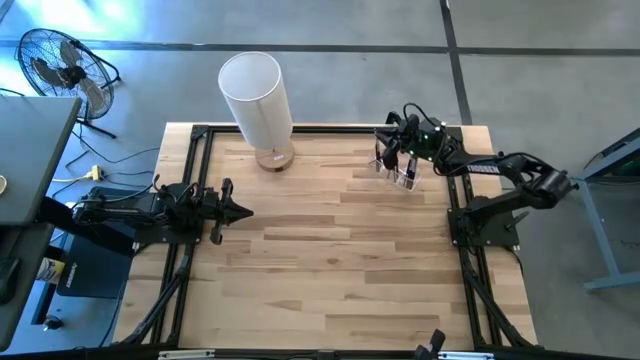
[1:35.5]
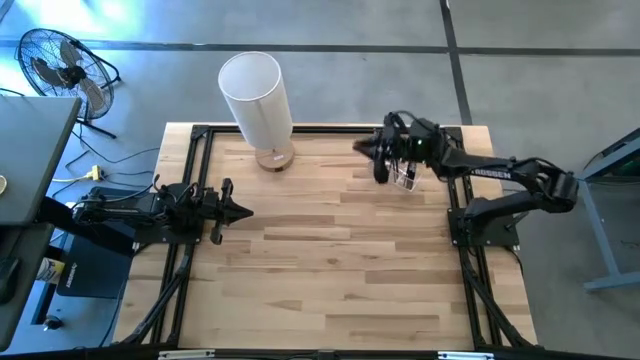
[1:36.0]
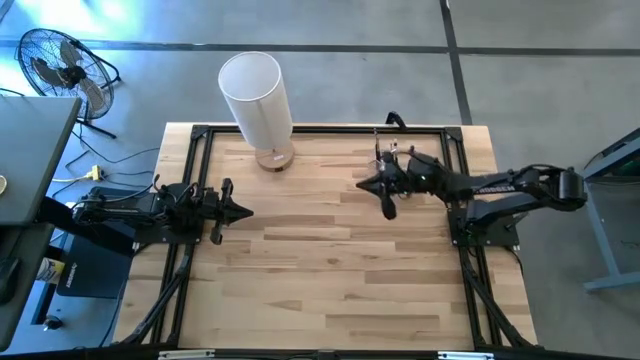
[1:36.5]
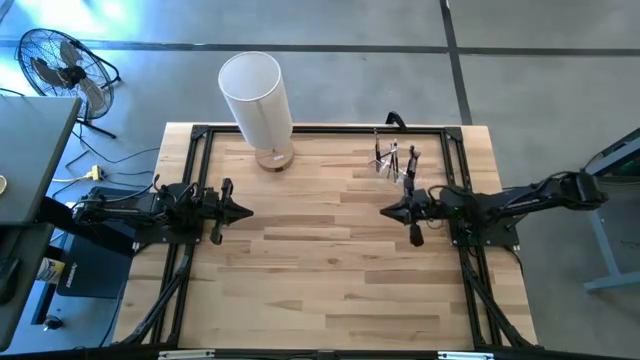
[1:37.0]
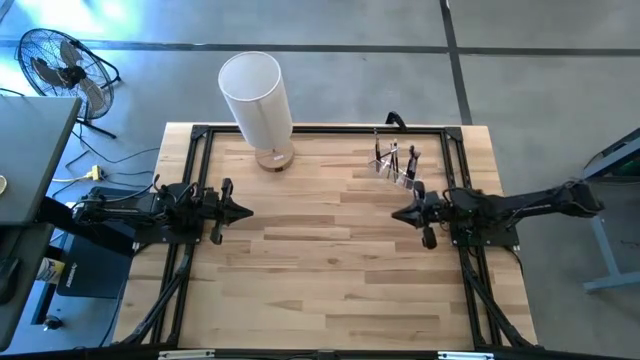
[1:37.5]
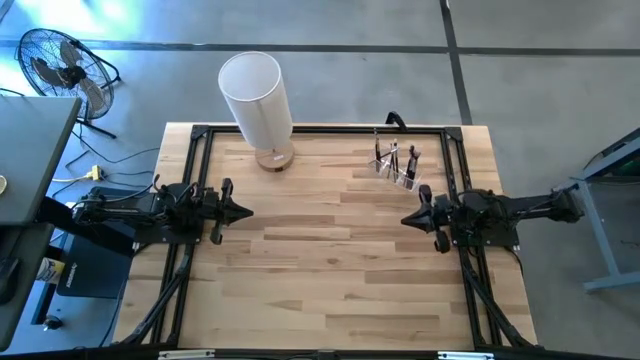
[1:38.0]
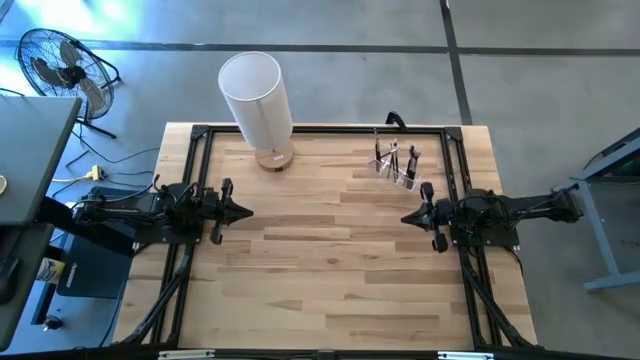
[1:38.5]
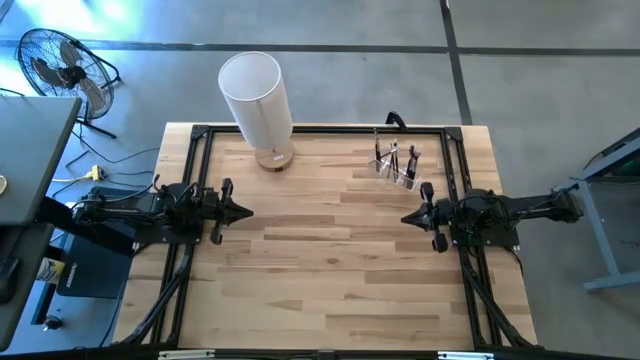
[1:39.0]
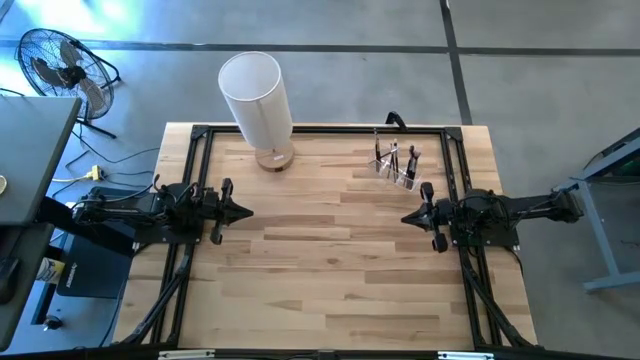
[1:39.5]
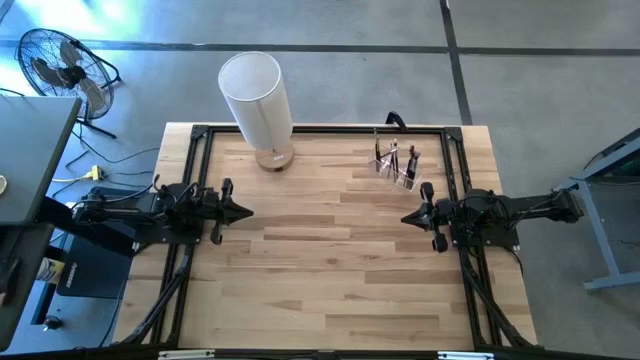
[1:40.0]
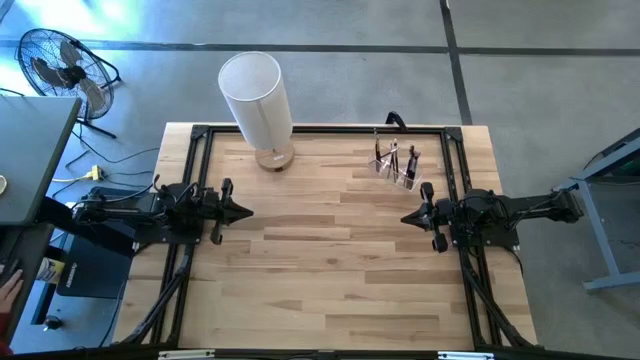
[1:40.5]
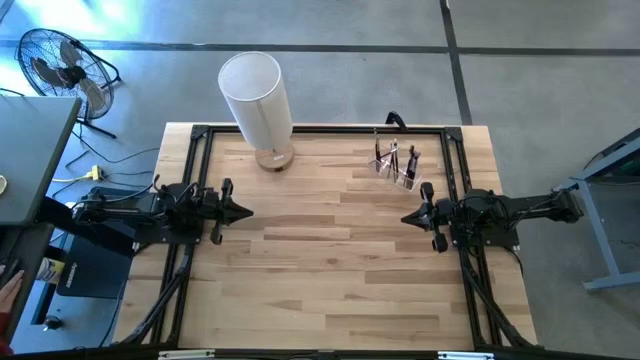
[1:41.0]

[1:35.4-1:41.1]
Task: Put items in baskets/containers
Return to Home Position

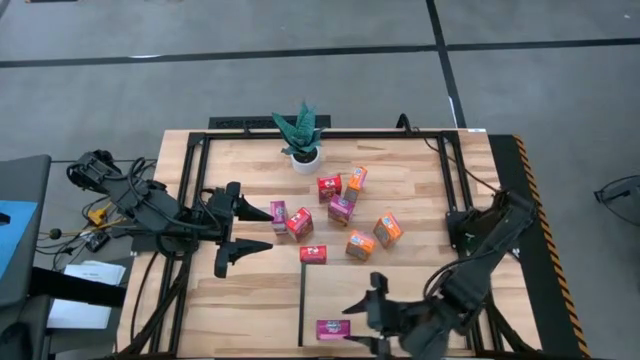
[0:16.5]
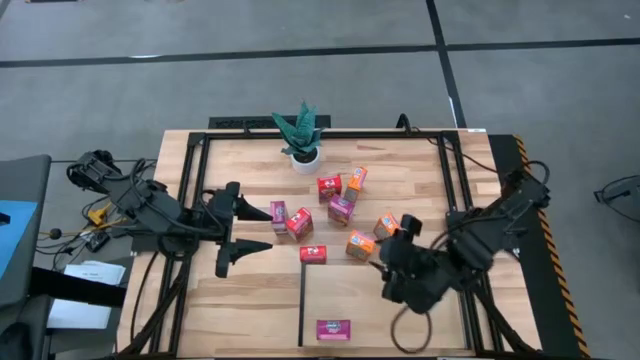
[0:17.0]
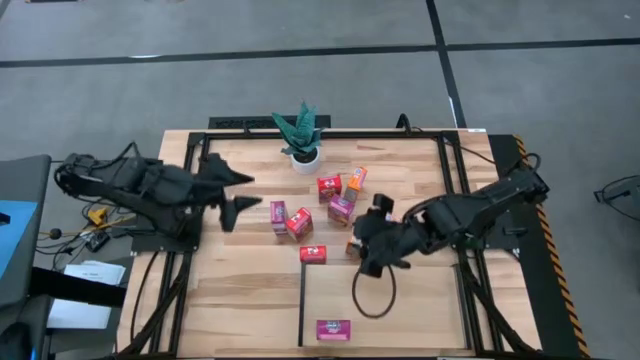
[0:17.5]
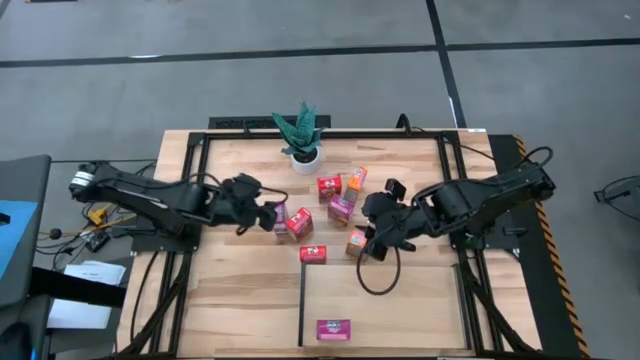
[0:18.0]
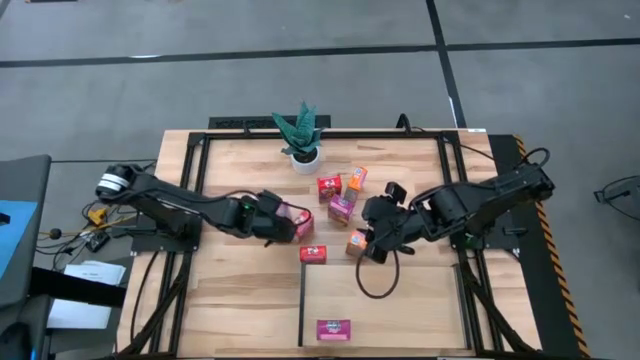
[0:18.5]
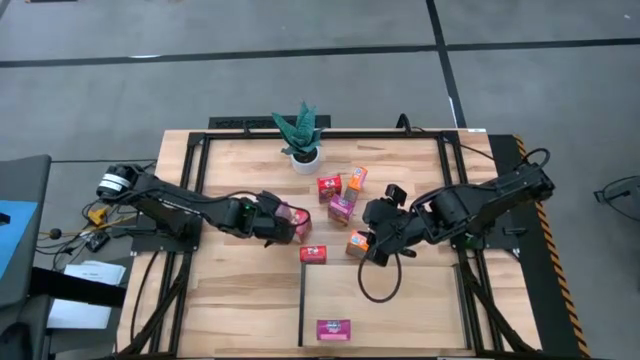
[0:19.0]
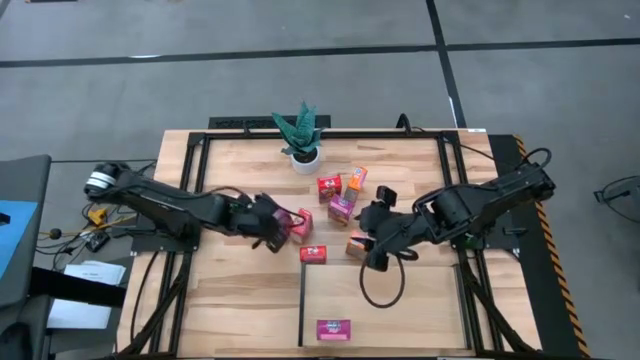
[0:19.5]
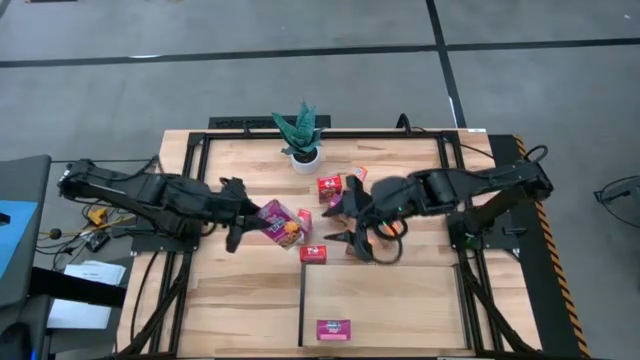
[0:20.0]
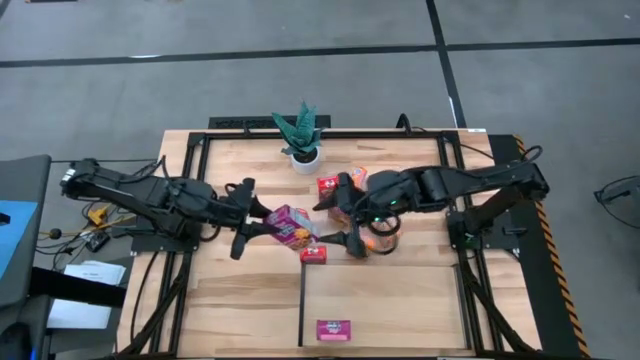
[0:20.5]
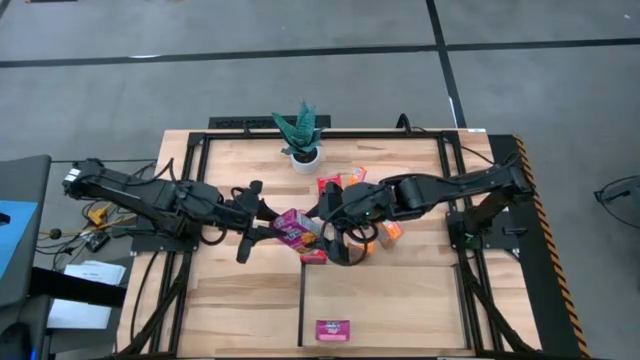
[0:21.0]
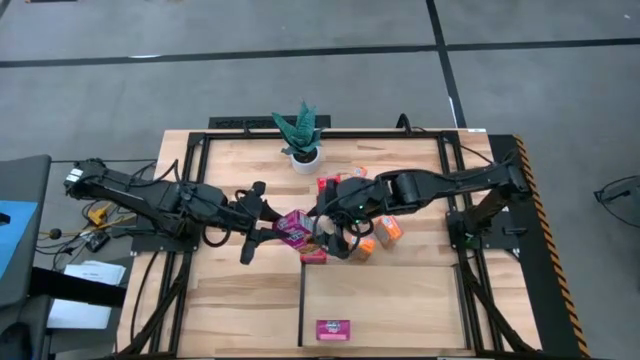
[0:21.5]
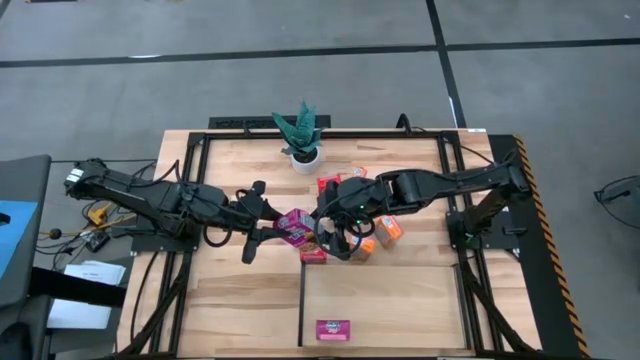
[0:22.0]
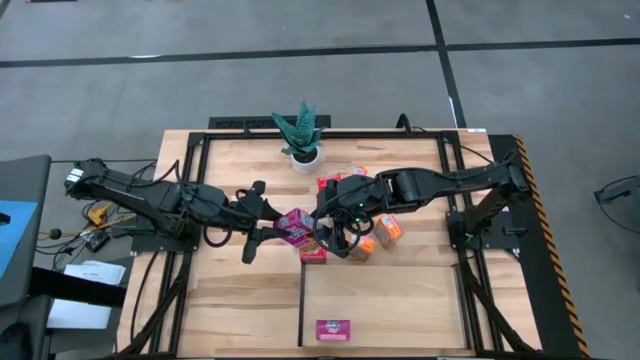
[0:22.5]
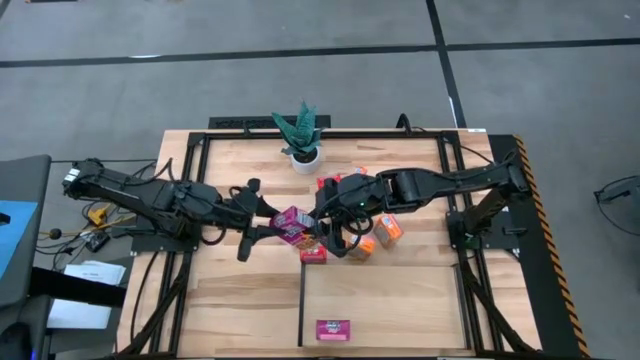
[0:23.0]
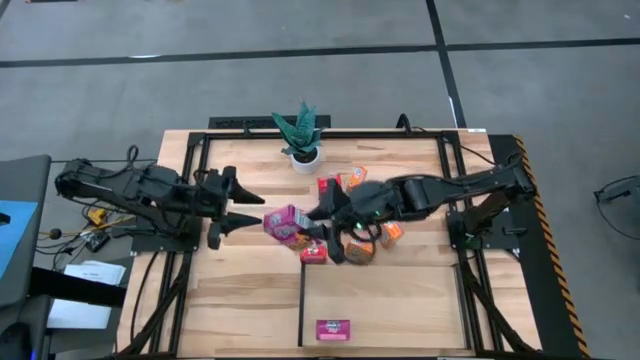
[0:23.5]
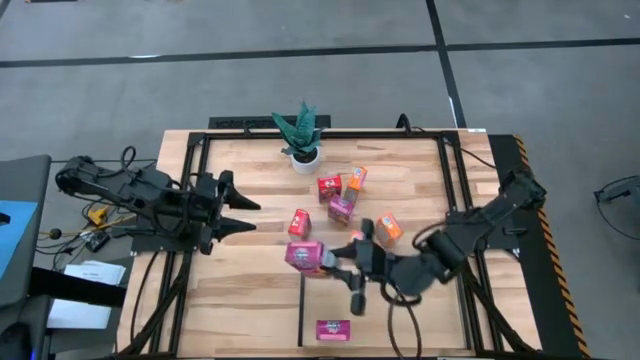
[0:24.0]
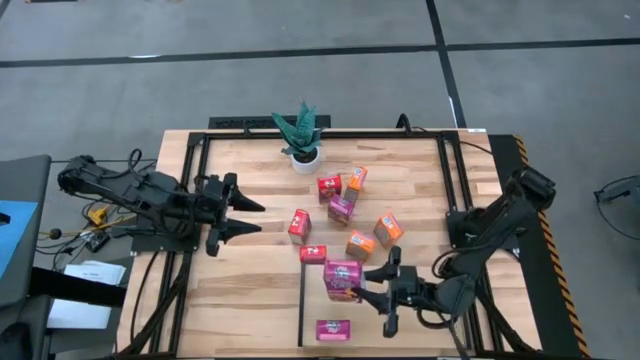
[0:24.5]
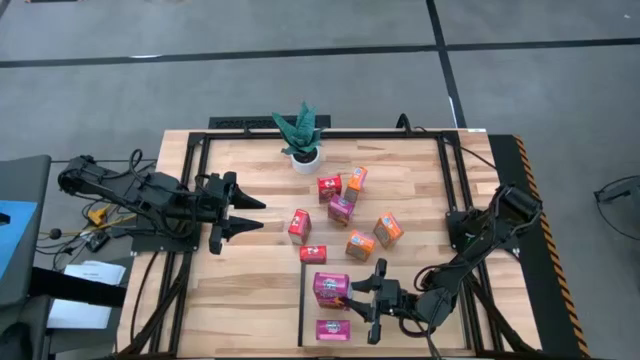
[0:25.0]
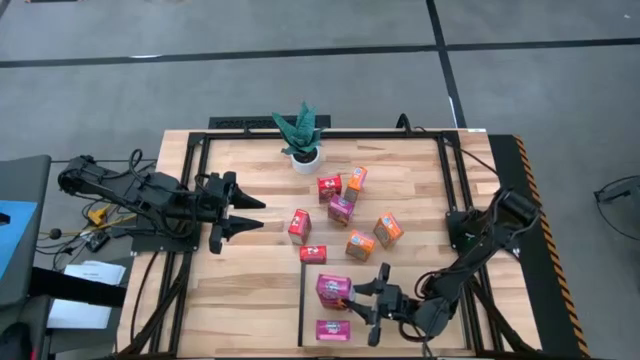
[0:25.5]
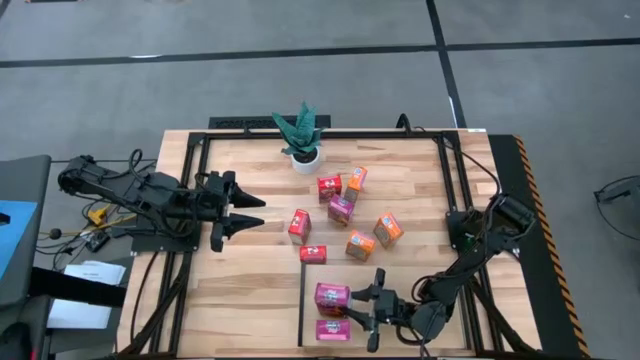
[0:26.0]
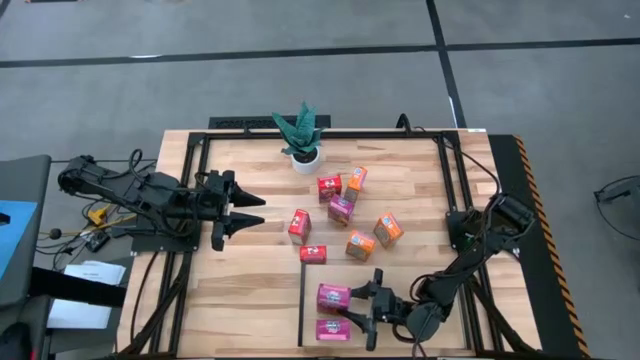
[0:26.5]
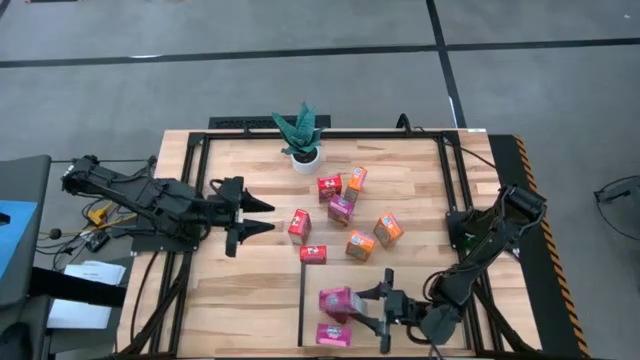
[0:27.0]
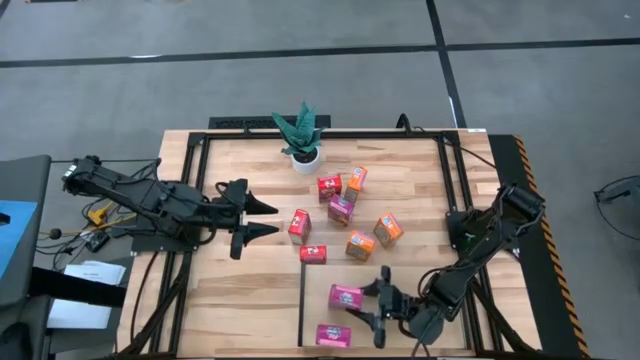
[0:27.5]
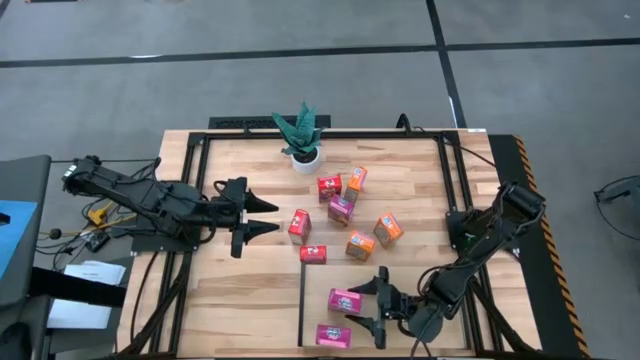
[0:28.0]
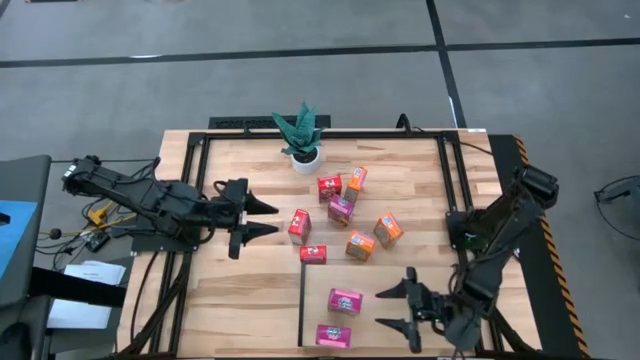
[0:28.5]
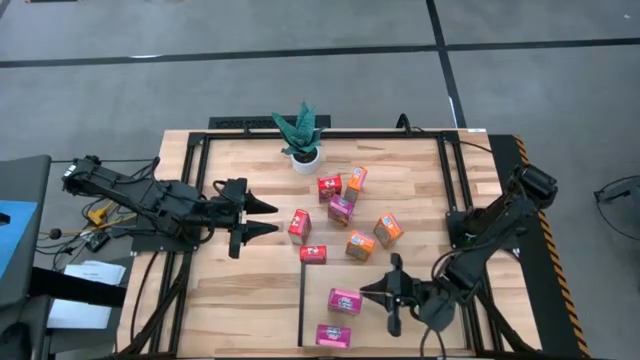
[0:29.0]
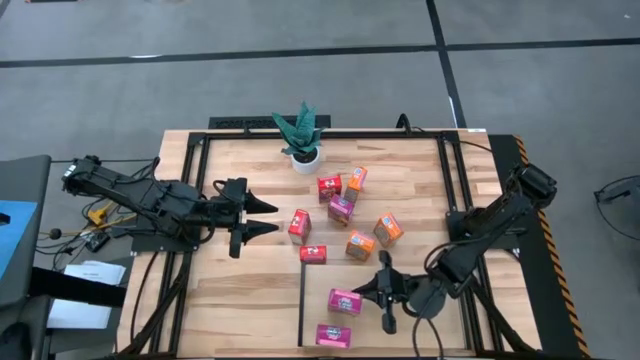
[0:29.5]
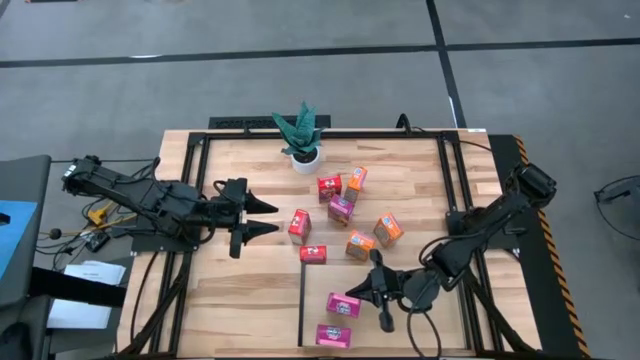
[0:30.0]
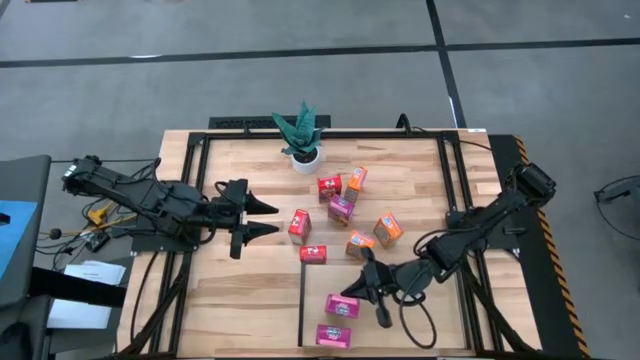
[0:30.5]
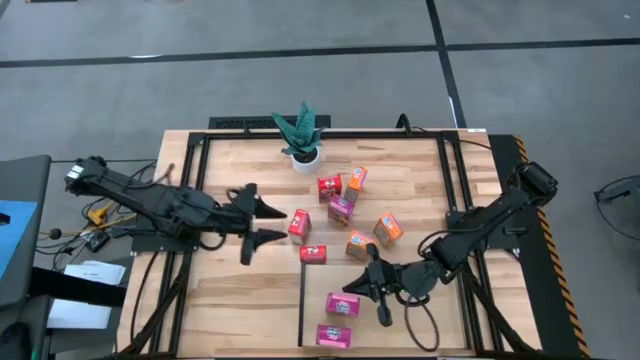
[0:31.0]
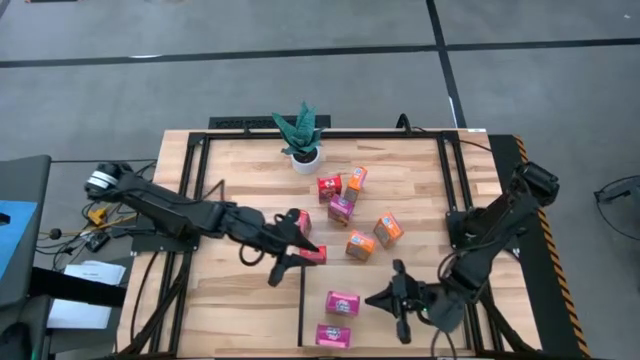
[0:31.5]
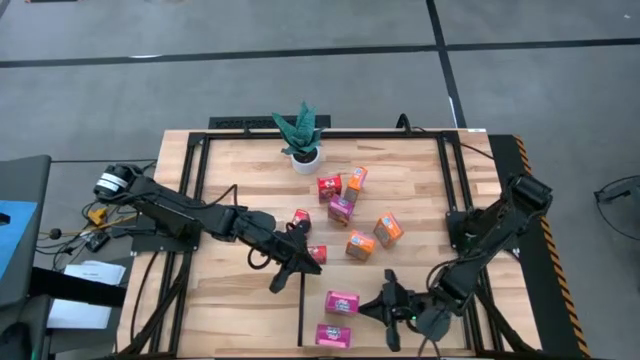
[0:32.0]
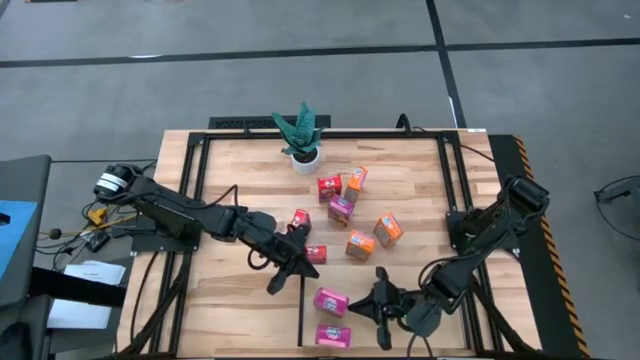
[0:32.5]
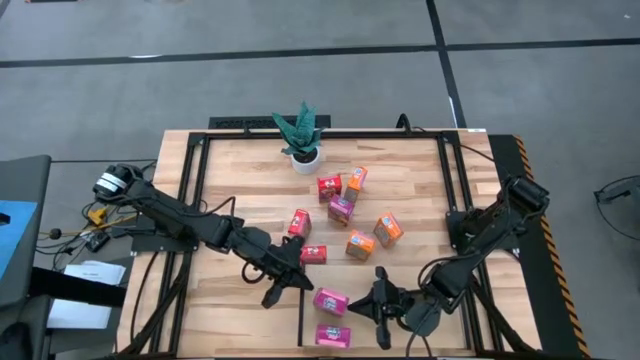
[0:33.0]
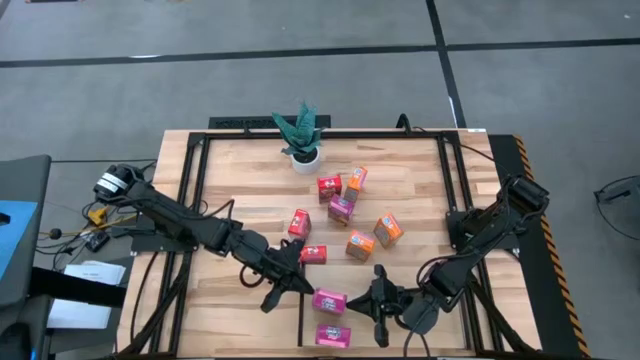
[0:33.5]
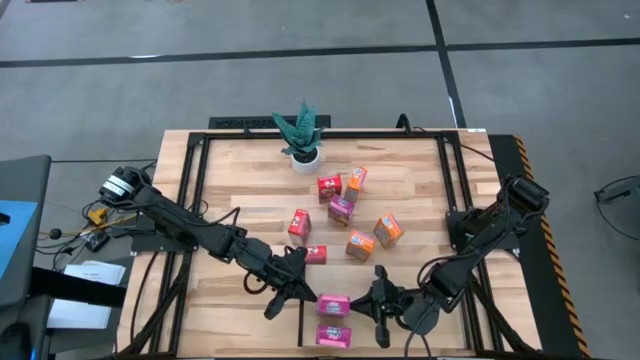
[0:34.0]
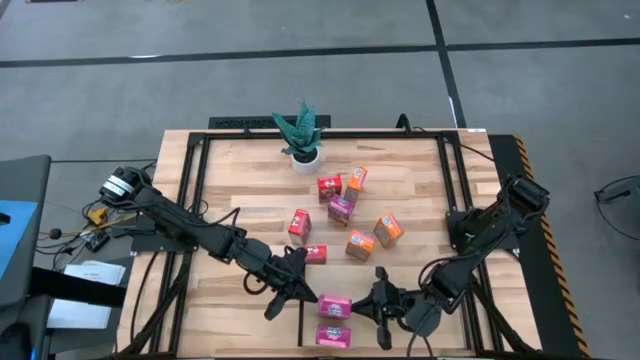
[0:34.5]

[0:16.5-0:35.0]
Task: Stack cereal on shelf
Put the purple cereal box on the middle left shelf
